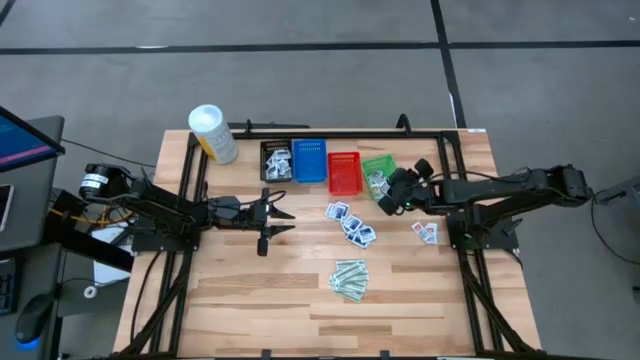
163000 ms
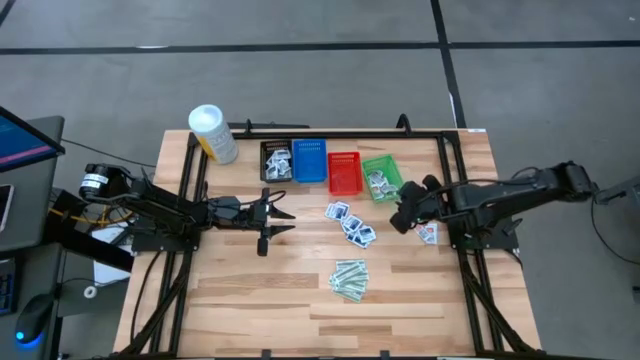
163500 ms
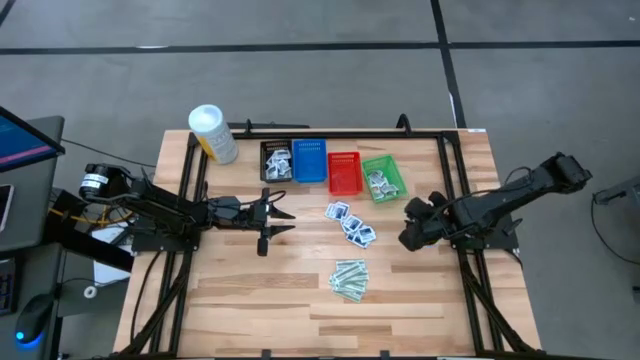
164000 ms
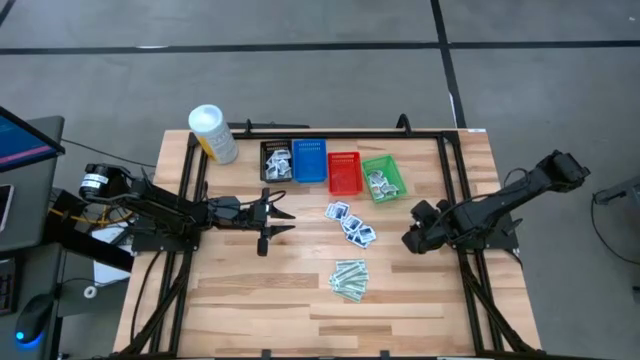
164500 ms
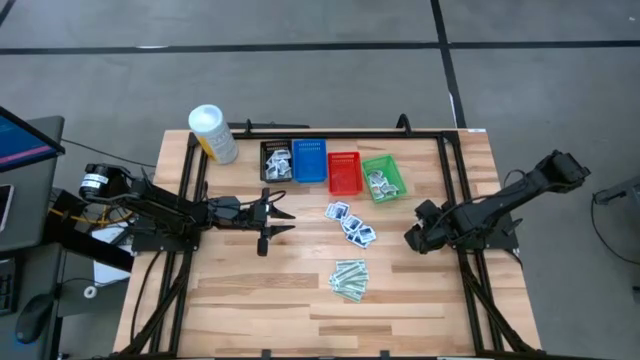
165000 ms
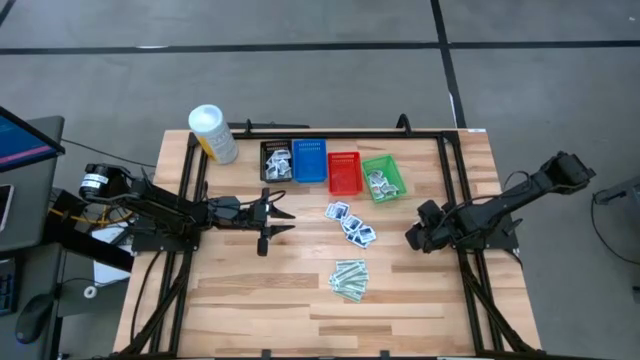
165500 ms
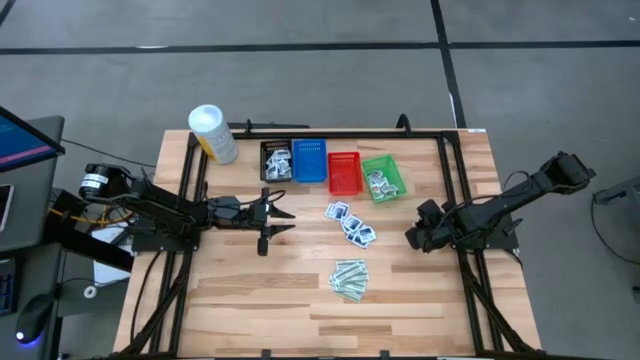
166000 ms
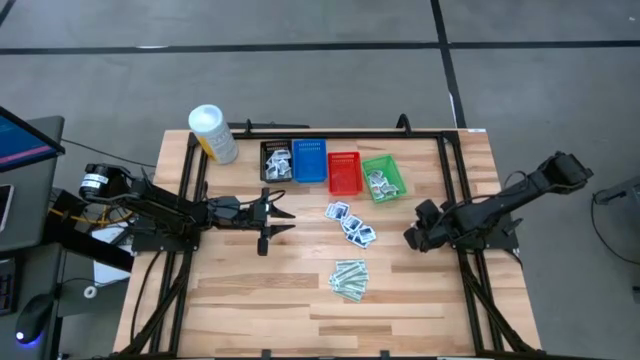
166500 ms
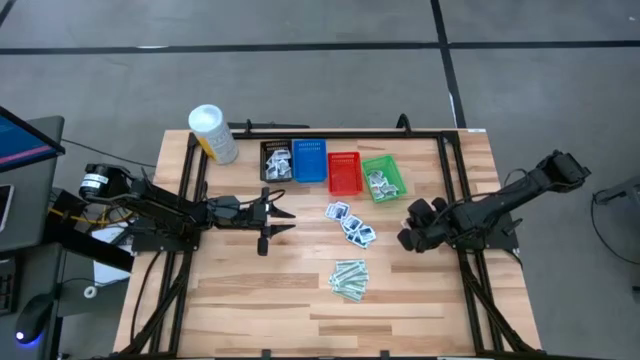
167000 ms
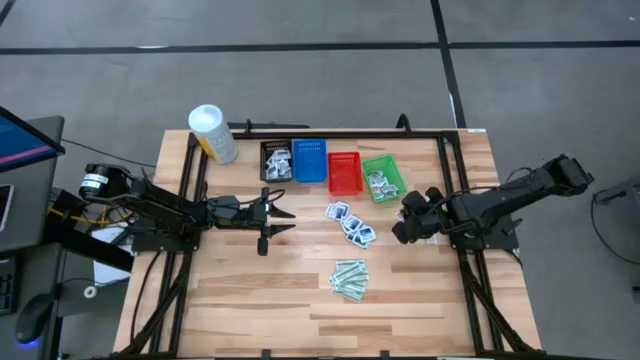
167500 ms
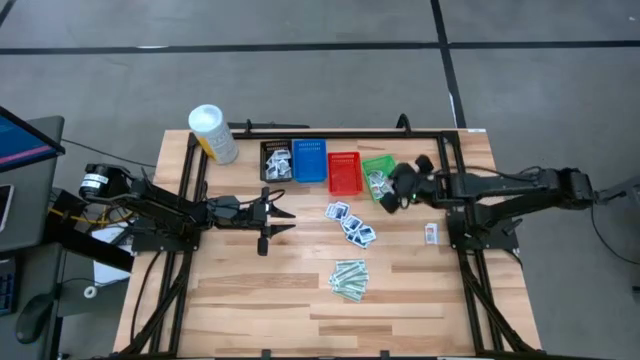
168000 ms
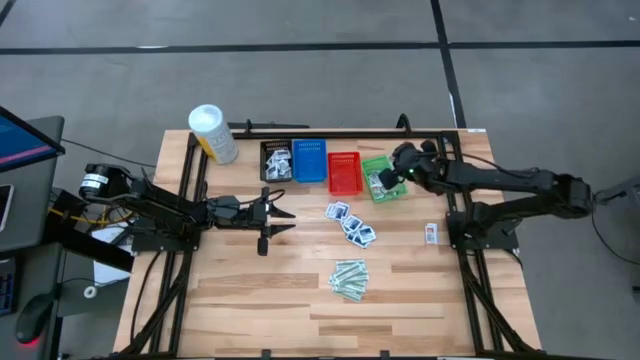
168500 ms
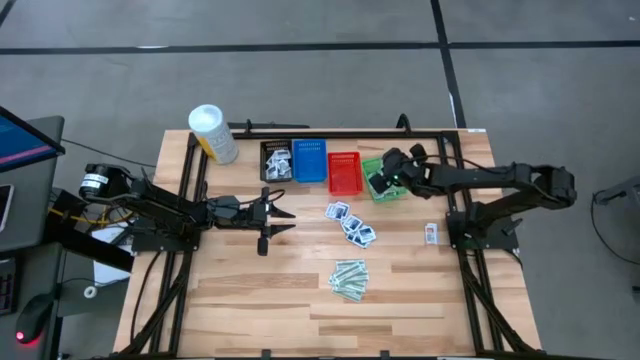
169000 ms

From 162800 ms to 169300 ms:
Task: Pick & Place First Aid Supplies
Put the orange pad into the green bin

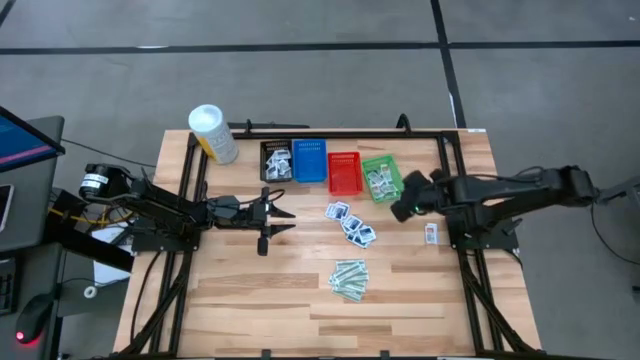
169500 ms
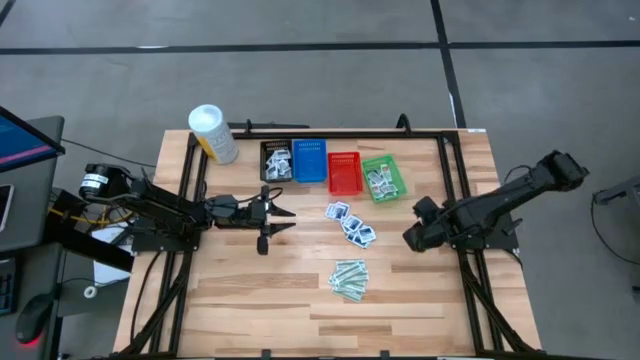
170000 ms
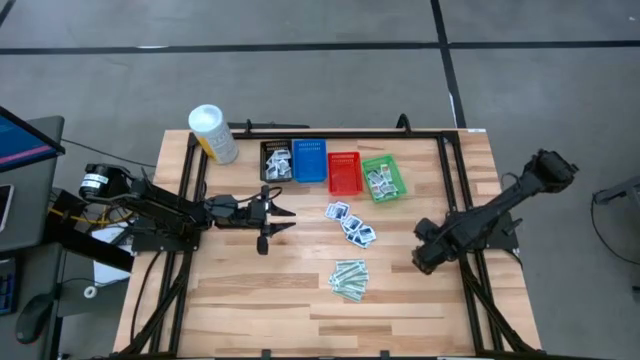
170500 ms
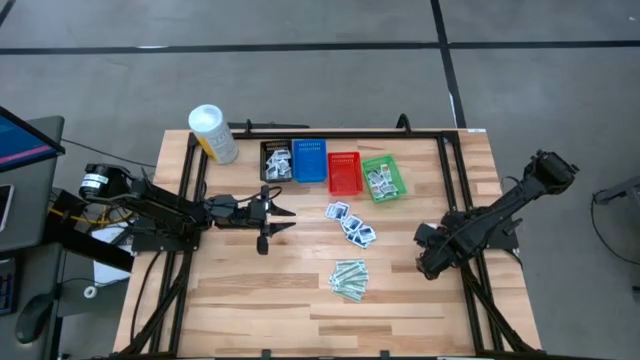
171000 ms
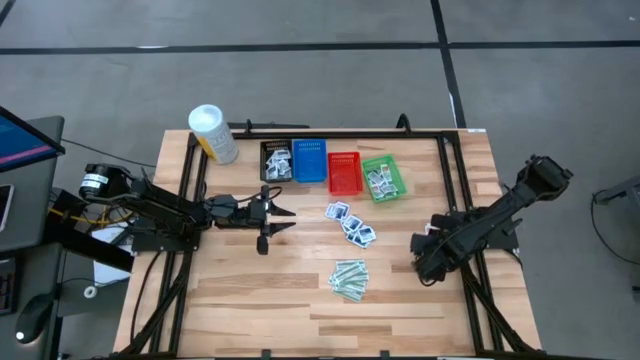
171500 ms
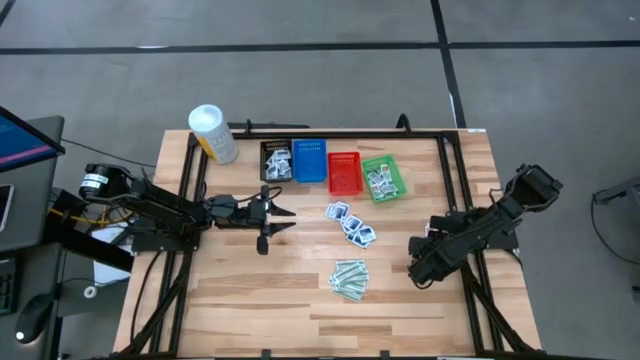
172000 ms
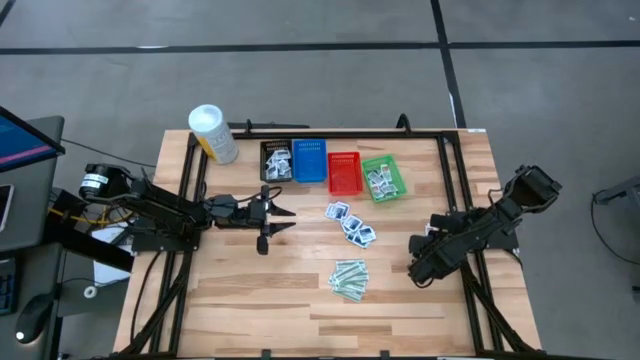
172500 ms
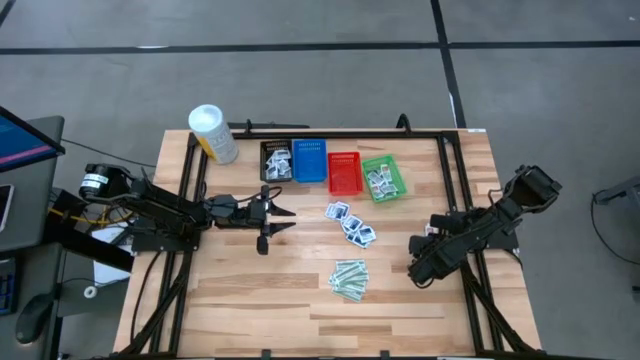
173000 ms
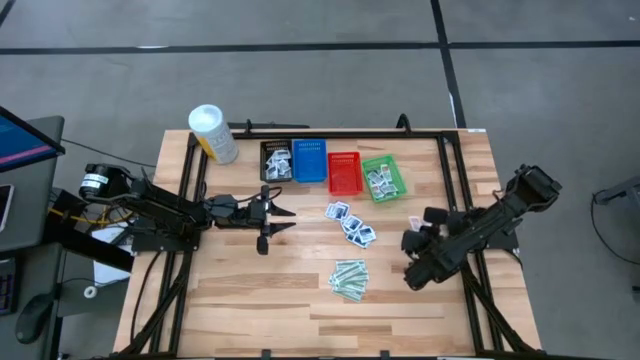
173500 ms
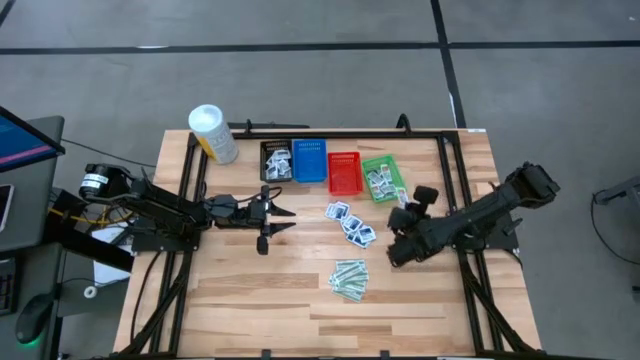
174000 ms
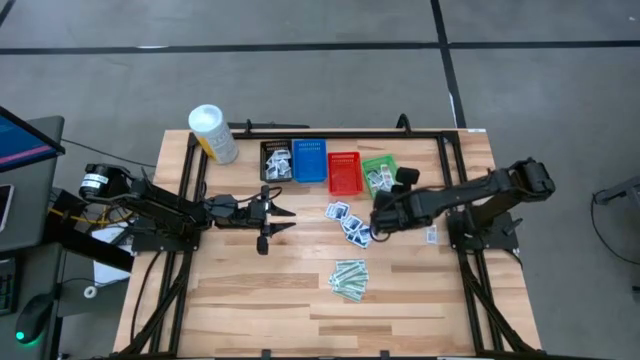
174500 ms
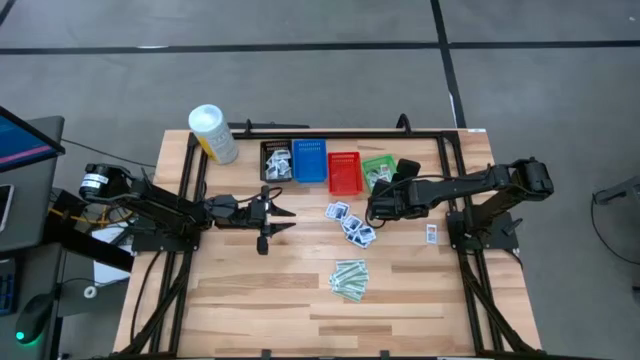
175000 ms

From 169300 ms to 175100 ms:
Put the orange pad into the green bin

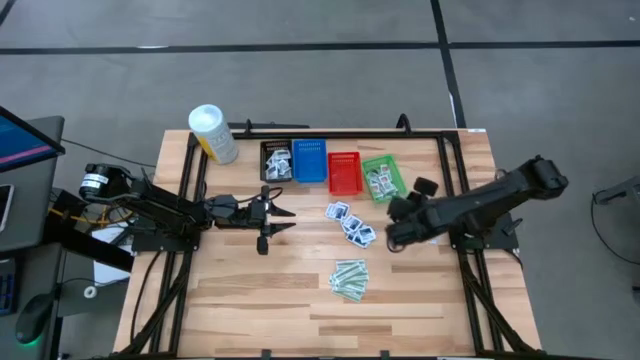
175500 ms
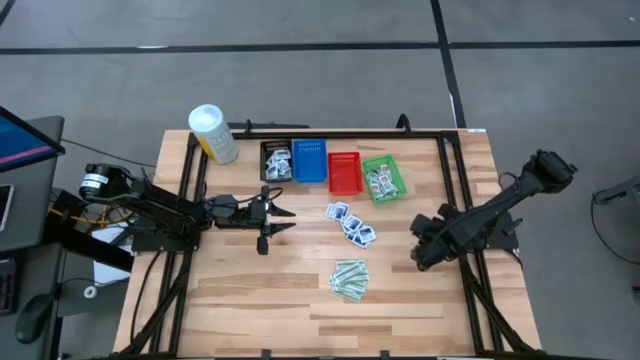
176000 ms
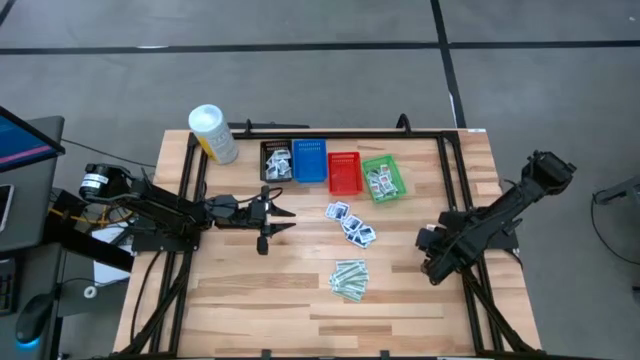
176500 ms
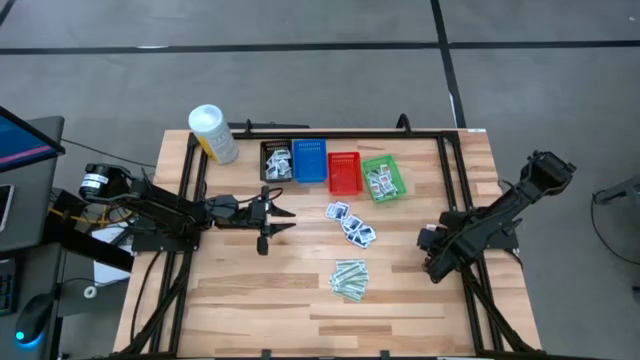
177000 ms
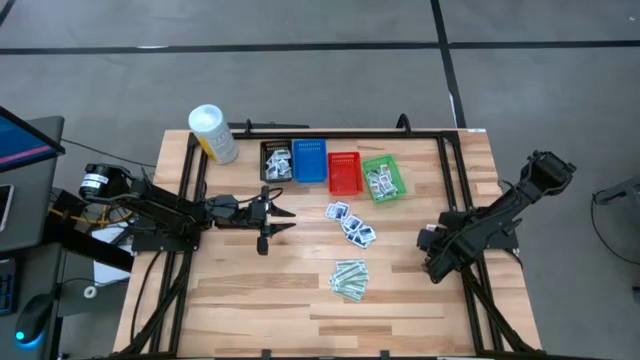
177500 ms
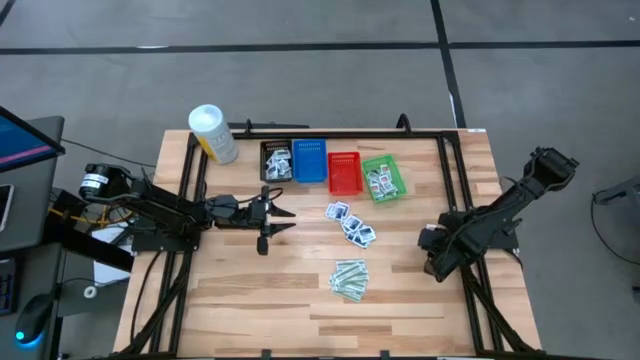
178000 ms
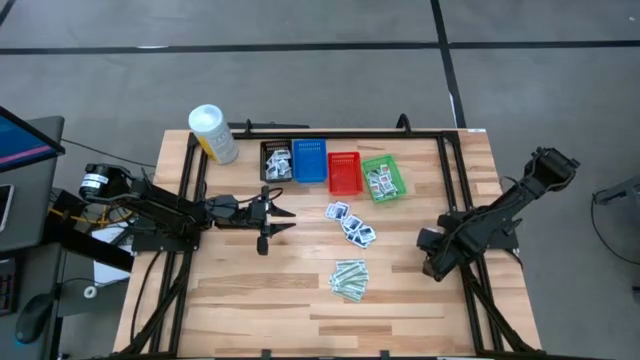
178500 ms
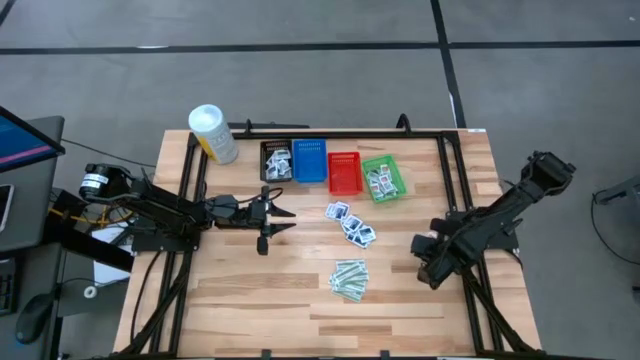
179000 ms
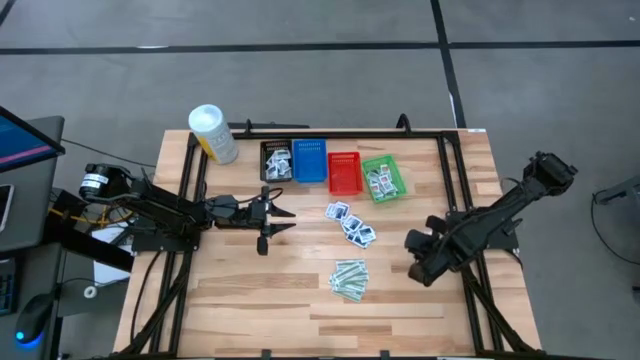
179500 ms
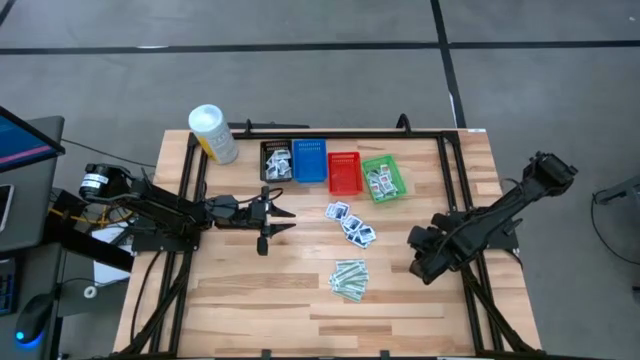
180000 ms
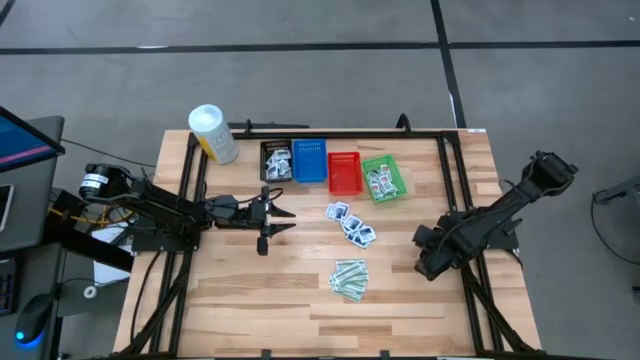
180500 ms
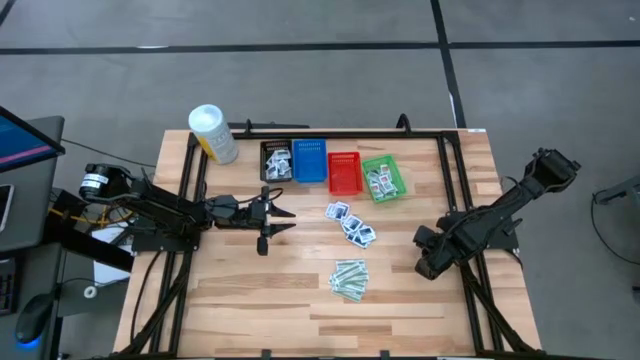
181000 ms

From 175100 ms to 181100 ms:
Put the orange pad into the green bin

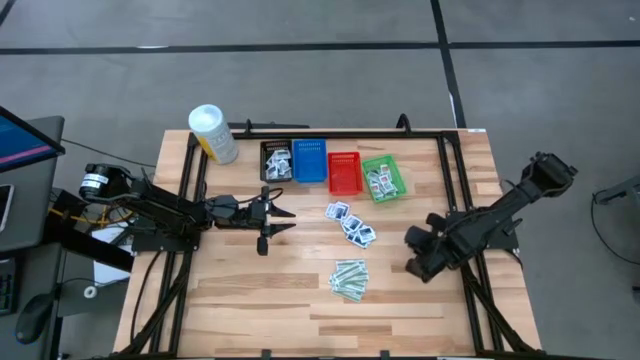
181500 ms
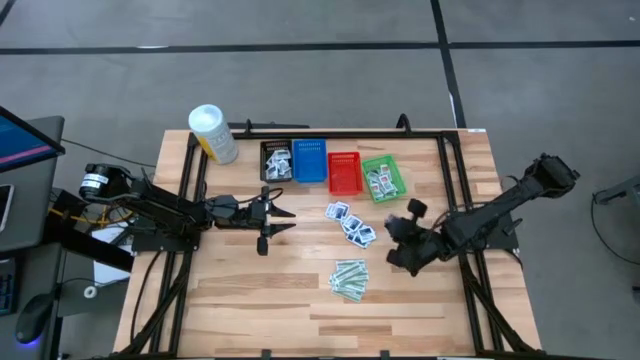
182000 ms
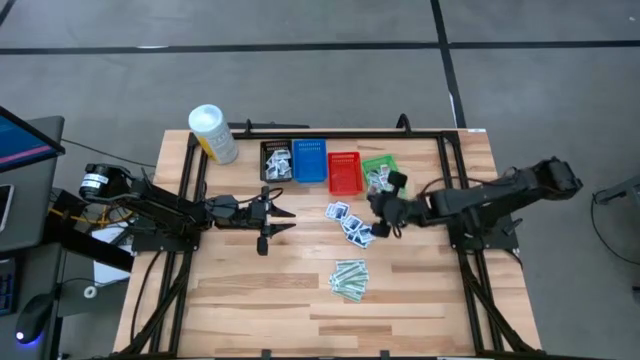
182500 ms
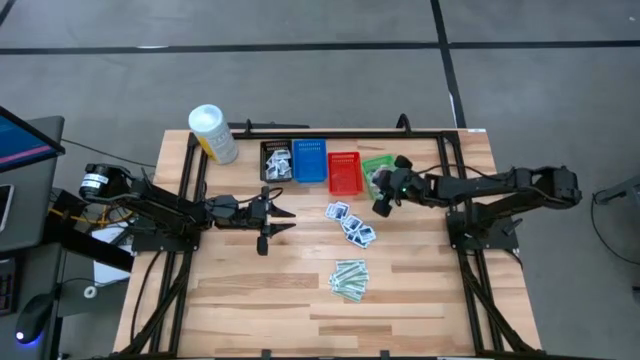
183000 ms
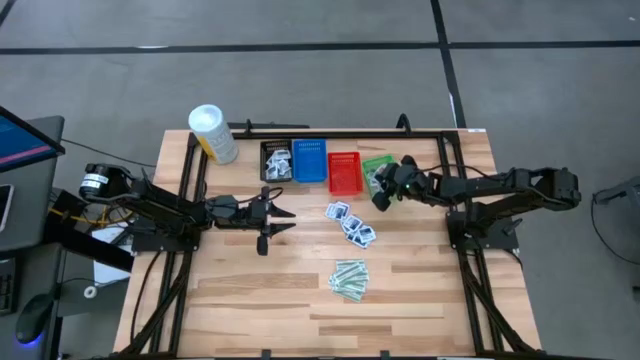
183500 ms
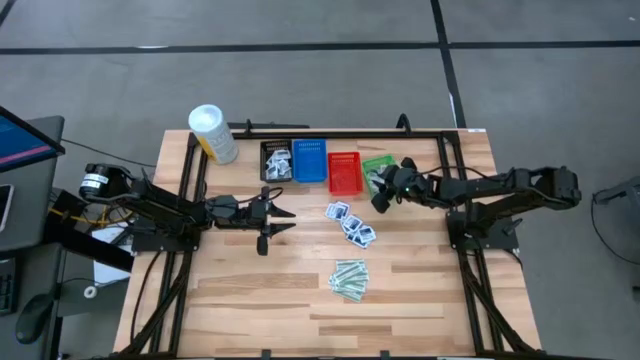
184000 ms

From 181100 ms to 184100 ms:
Put the orange pad into the green bin
